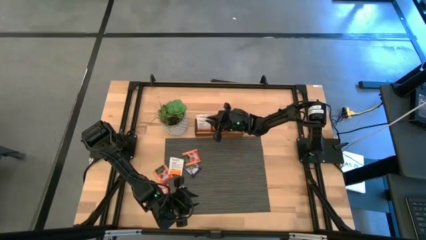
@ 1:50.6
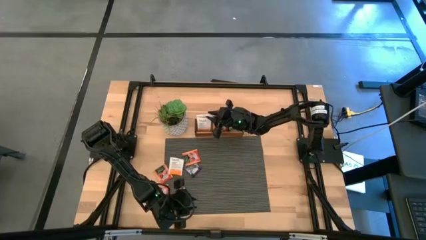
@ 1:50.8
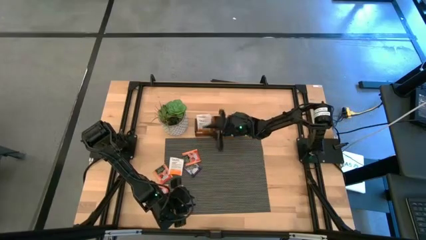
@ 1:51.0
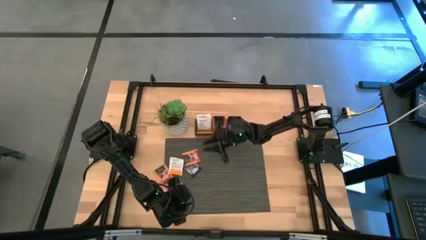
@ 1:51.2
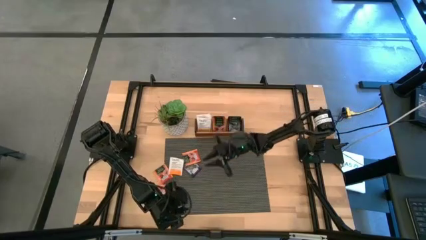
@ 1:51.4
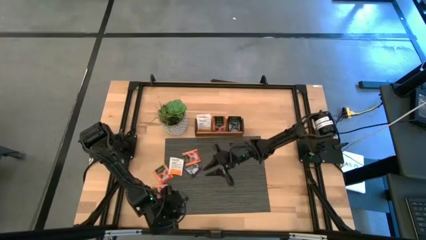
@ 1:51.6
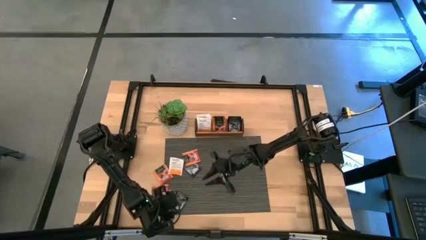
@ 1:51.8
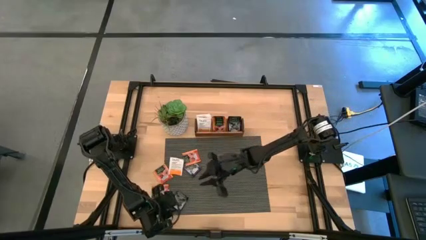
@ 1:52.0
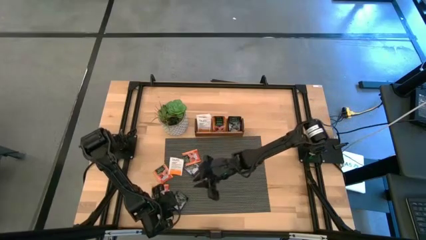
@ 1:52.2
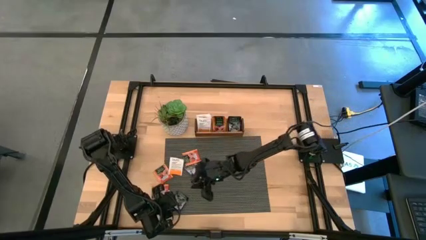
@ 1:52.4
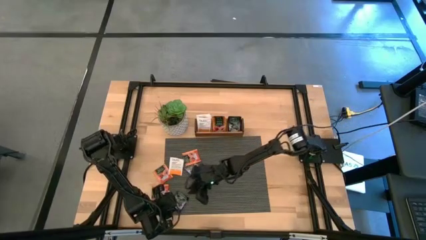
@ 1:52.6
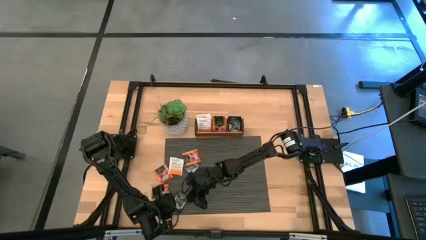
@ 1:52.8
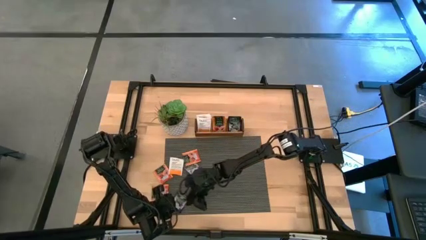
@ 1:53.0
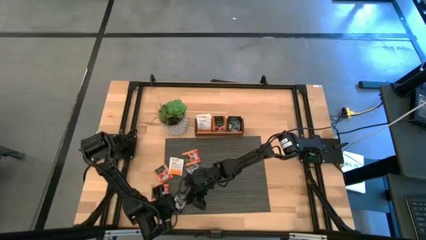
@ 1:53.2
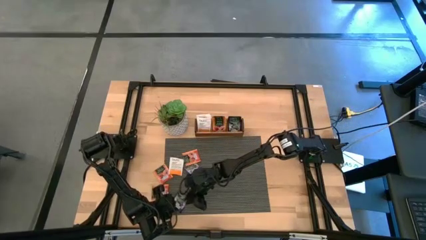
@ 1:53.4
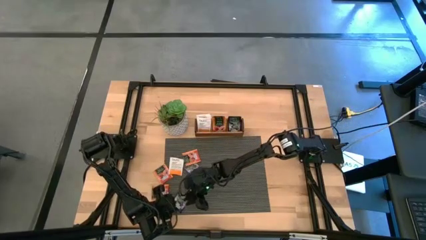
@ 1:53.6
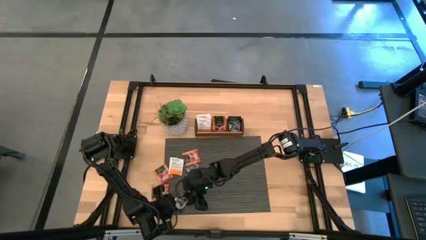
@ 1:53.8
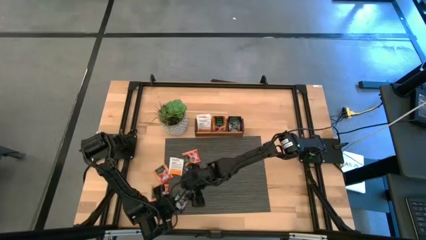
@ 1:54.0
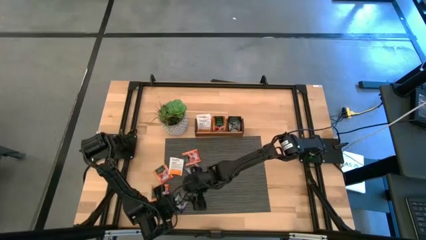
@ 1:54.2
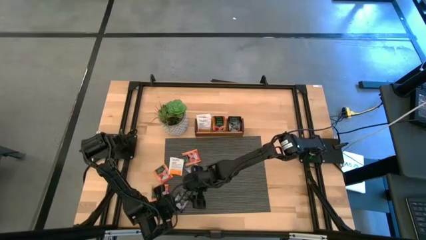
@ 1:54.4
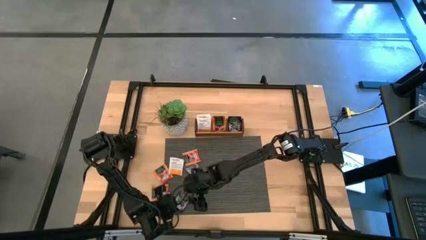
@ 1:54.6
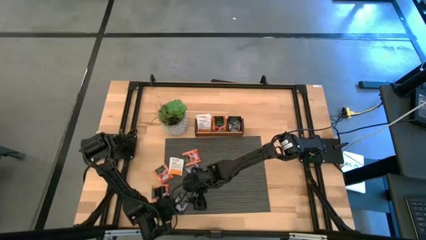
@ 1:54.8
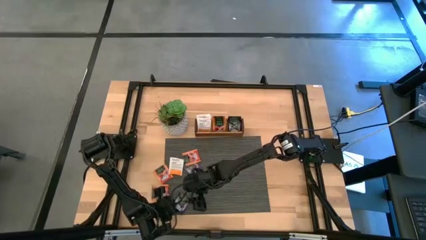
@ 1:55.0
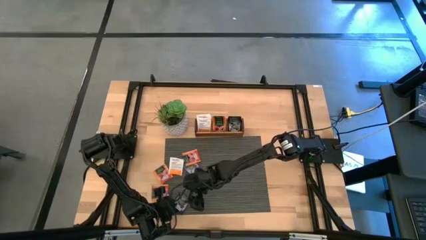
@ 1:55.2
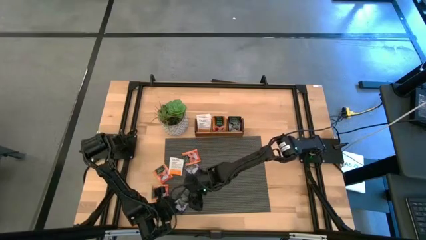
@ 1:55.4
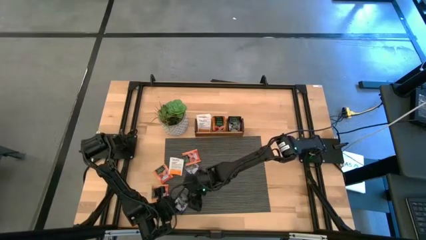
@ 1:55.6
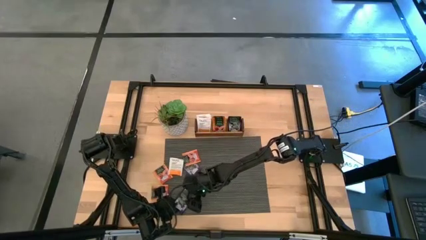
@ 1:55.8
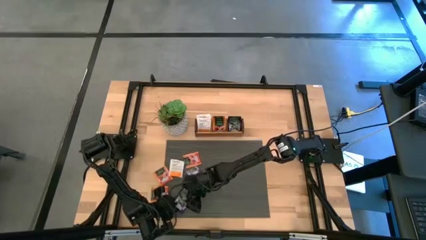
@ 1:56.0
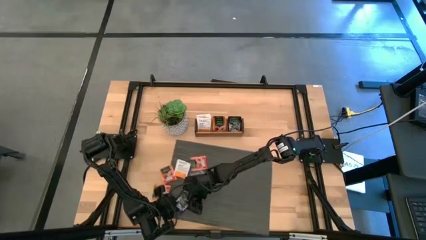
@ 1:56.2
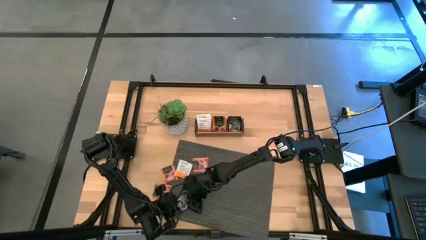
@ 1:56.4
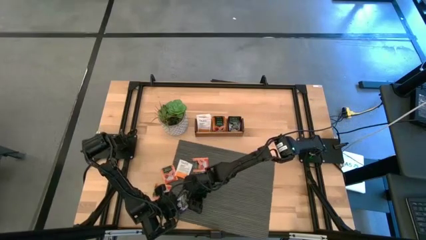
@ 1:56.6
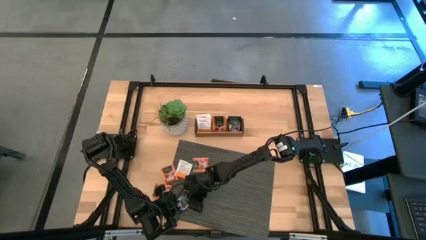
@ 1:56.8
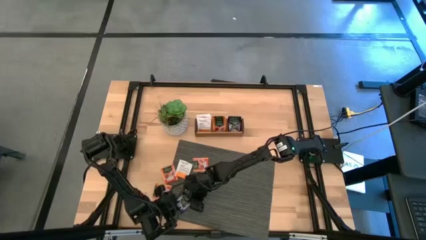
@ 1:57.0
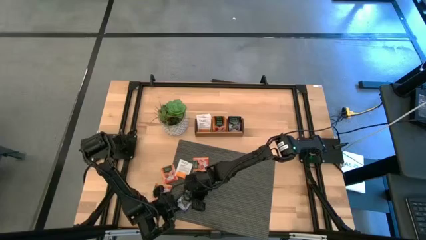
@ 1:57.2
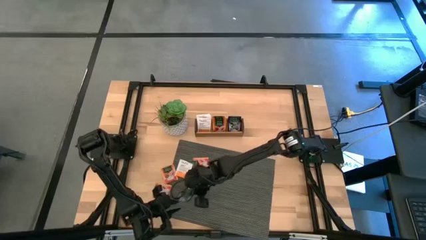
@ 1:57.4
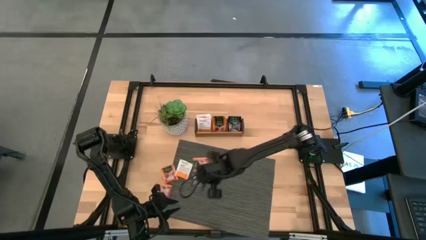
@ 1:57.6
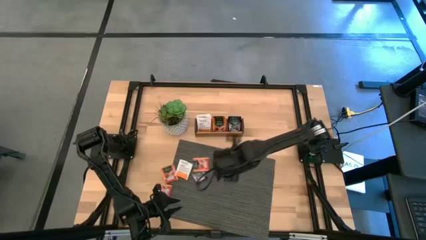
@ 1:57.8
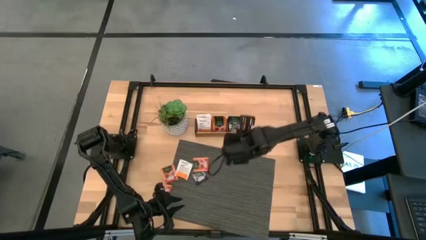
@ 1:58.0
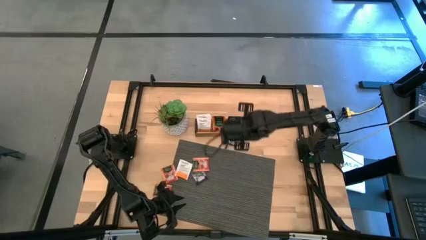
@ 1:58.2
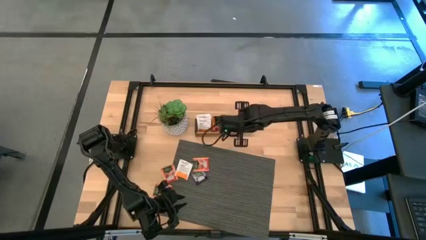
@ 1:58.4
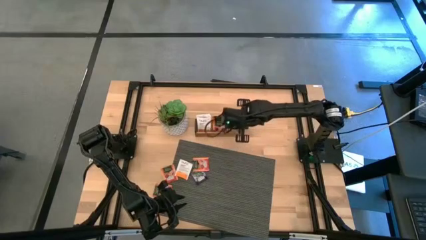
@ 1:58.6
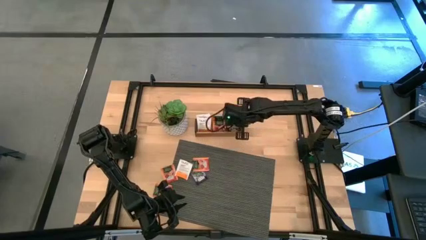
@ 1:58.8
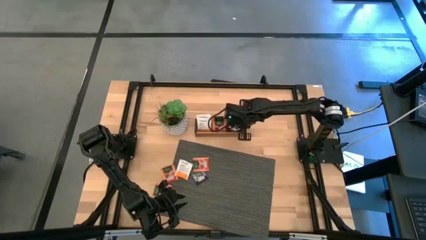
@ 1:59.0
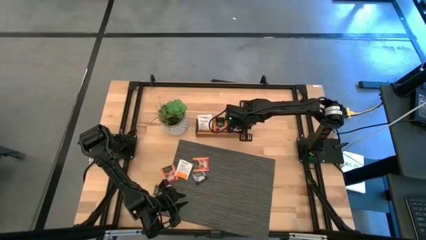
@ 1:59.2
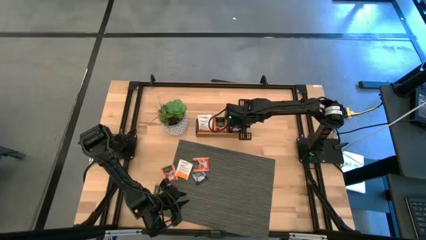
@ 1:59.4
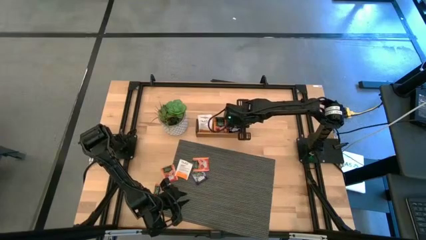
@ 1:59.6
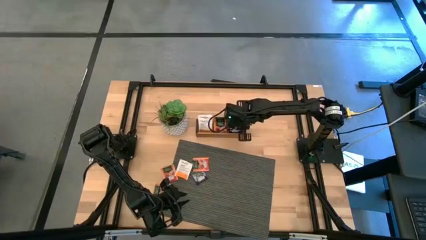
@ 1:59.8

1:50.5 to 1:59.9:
Task: Pick & Place Tea
Put the blue tea bag into the right section of the wooden organizer

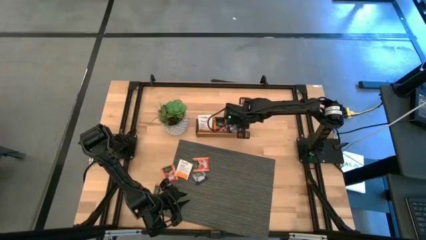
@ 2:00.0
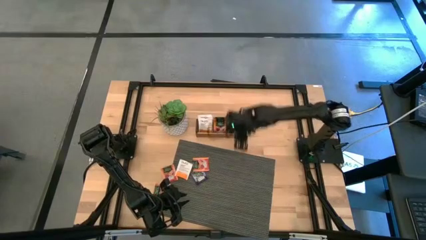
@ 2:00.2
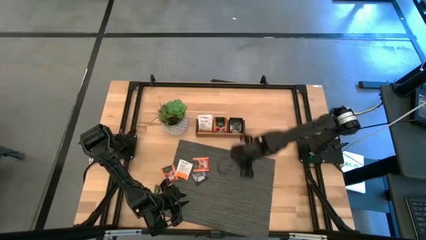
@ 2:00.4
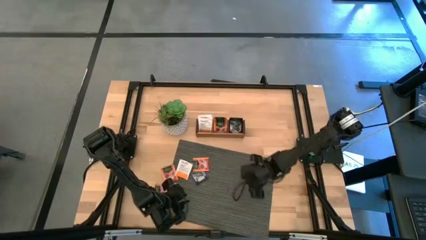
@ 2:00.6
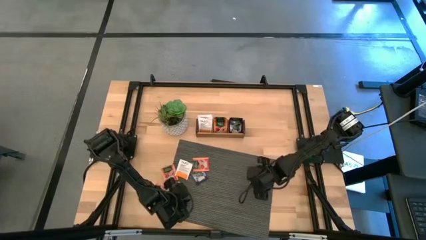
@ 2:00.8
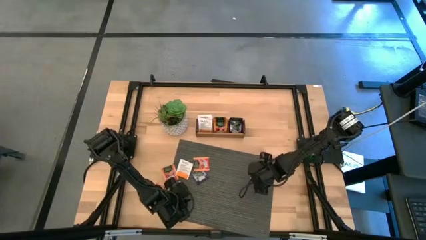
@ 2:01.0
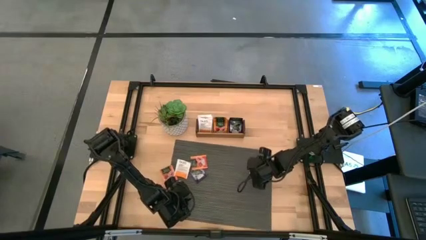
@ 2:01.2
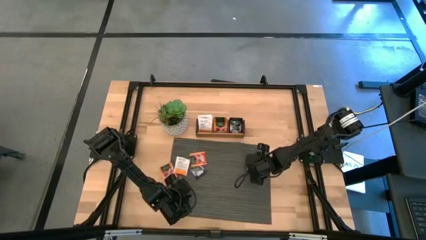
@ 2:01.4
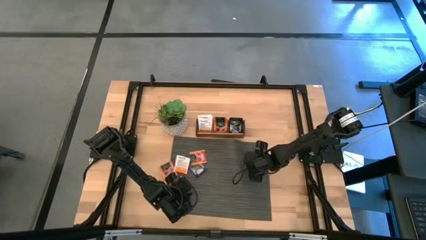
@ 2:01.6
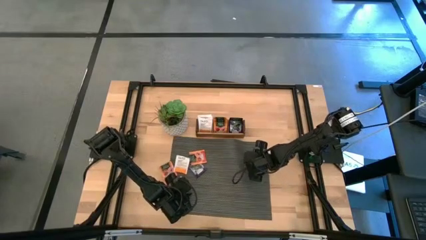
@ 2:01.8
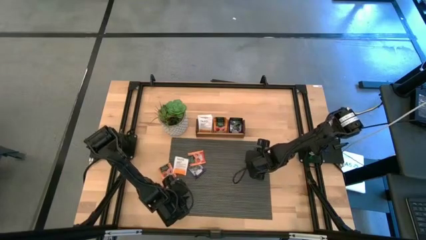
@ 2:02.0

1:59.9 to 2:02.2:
Adjust the gray mat

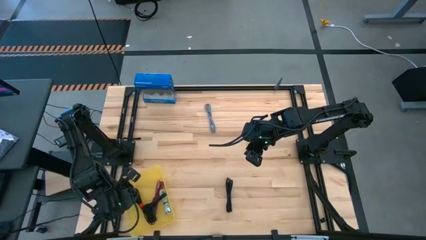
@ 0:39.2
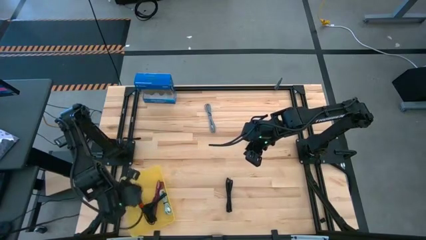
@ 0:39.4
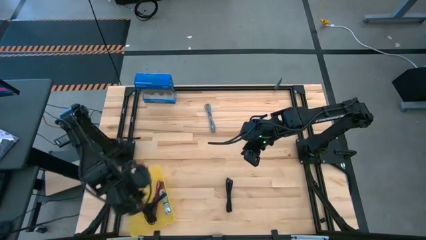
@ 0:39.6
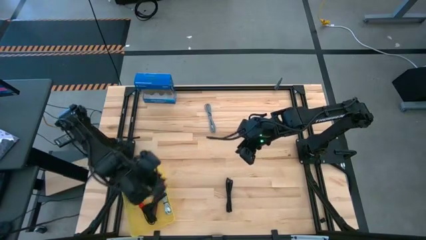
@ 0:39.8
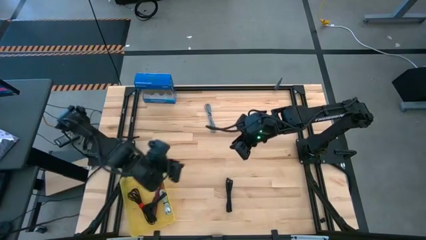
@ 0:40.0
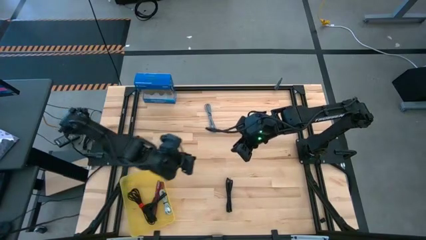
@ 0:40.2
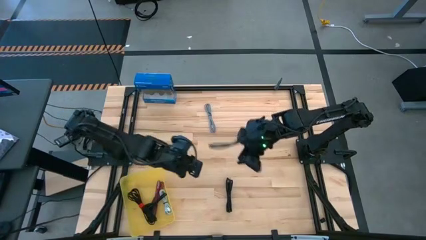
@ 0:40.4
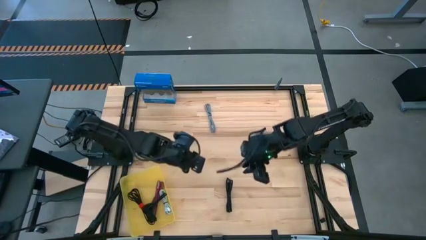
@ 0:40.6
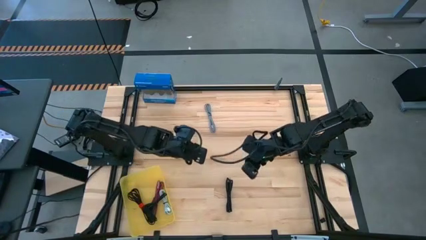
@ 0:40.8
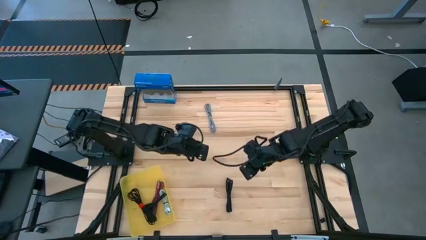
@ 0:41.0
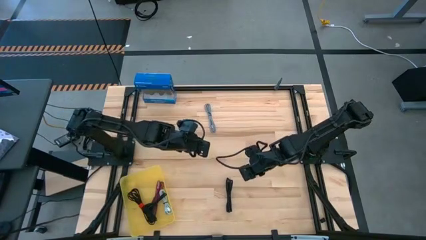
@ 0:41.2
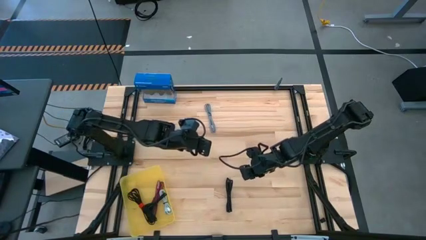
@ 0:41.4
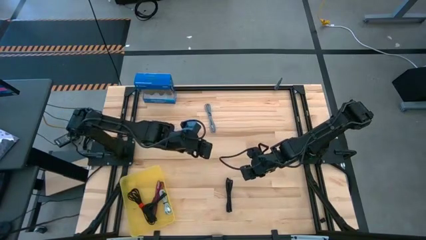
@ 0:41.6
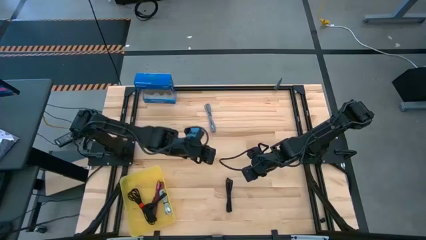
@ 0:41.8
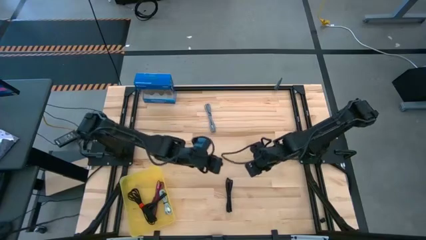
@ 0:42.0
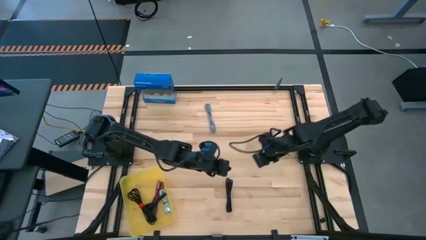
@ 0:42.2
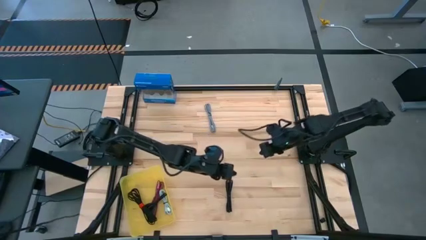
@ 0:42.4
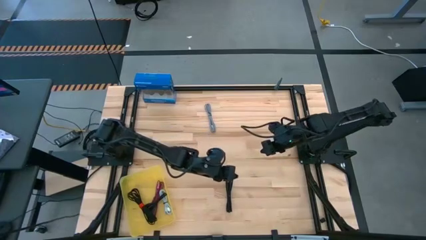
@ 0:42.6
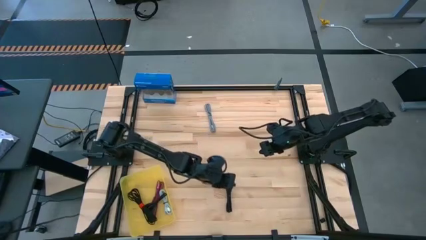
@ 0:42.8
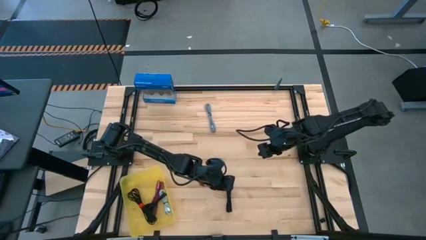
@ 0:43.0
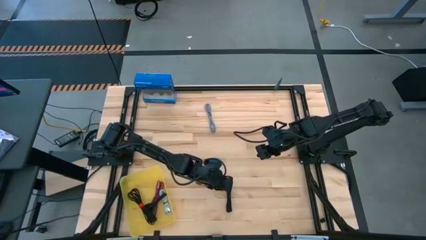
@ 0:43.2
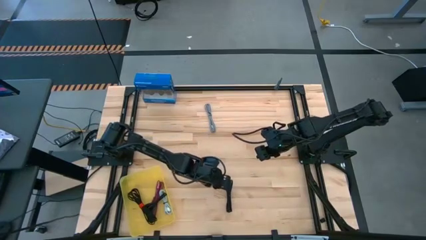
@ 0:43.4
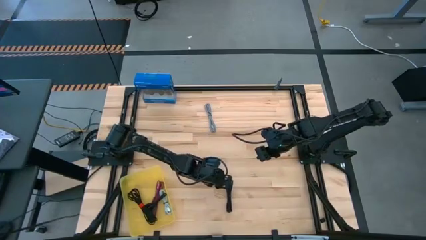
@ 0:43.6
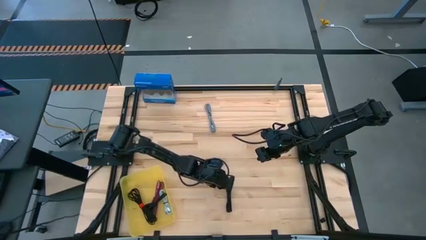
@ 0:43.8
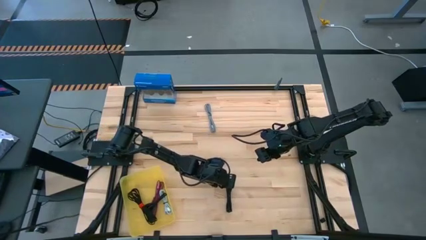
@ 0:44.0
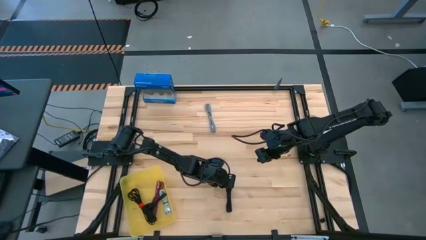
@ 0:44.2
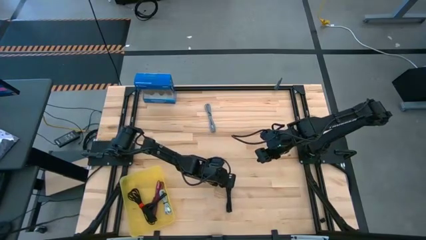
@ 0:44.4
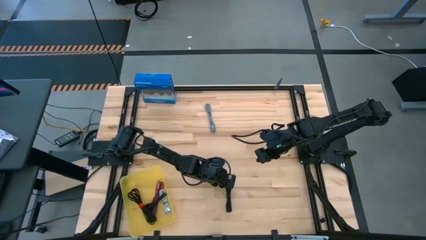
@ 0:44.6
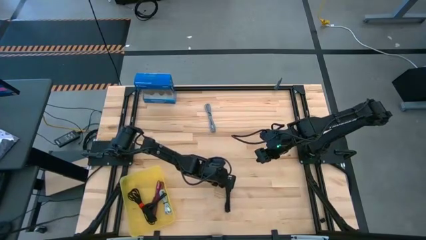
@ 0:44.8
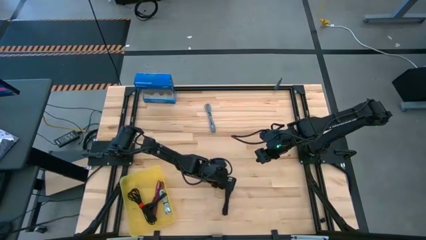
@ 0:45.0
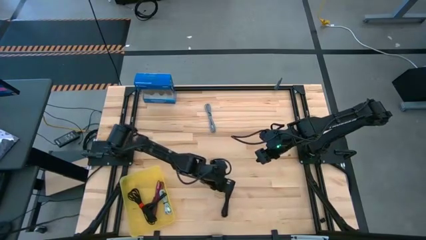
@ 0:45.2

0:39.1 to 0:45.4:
Task: Pick and place USB-C Cables
Put the black charger cable into the yellow bin
